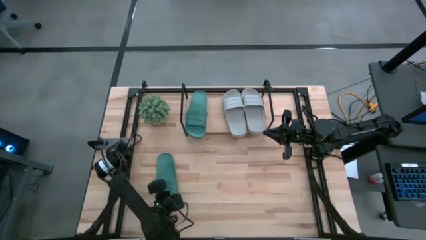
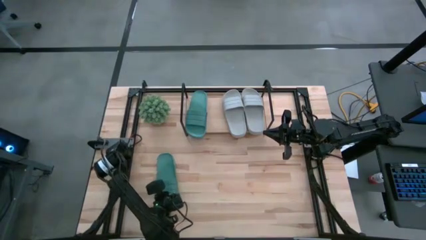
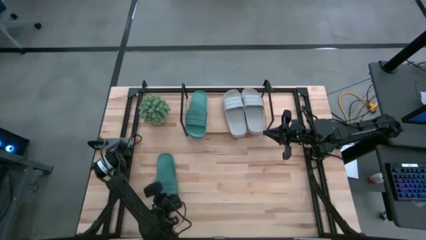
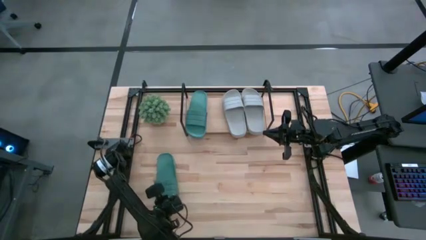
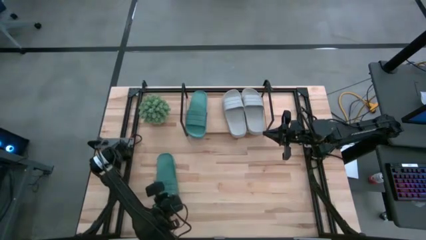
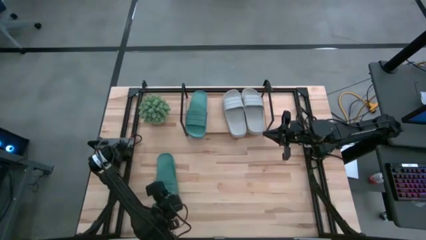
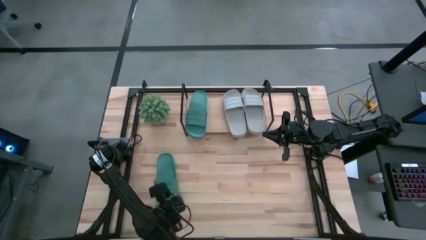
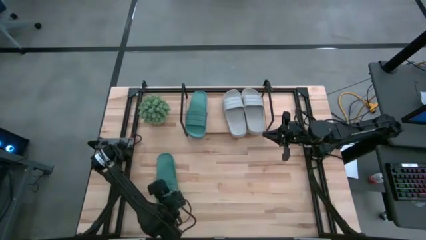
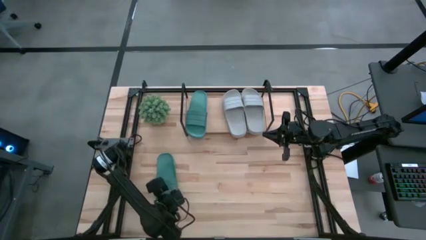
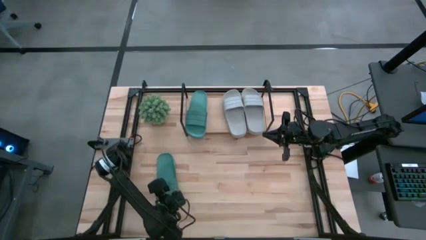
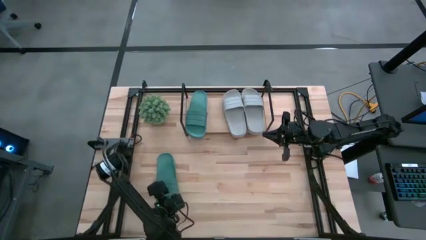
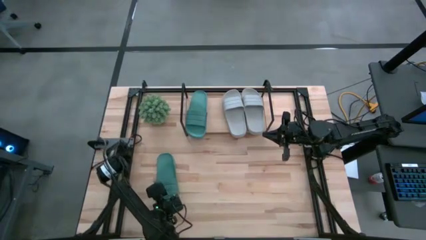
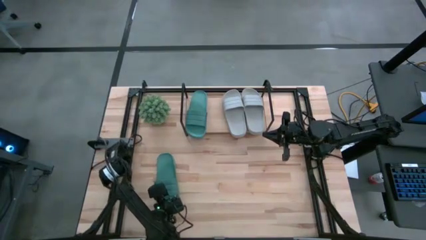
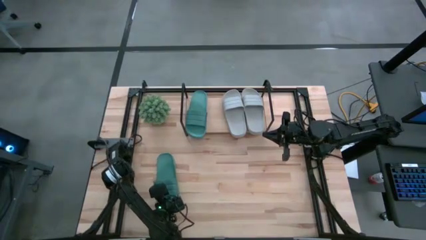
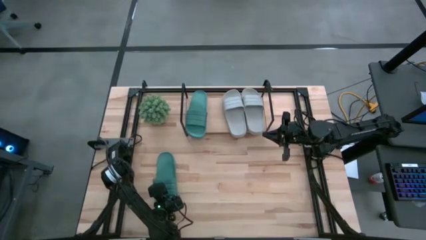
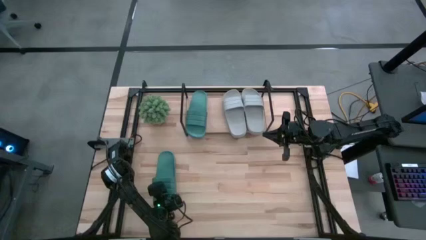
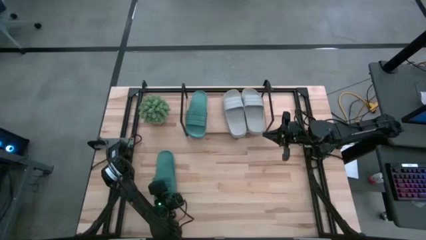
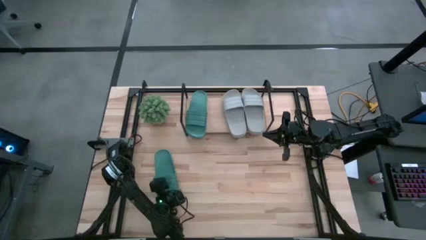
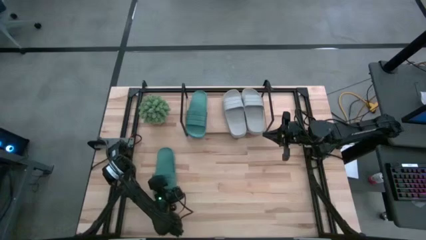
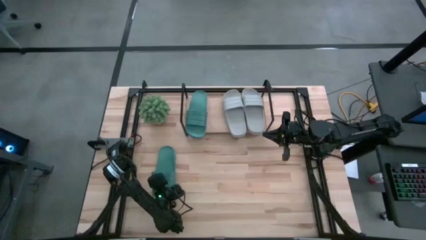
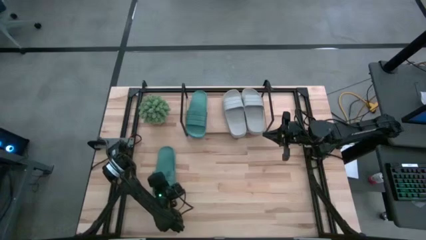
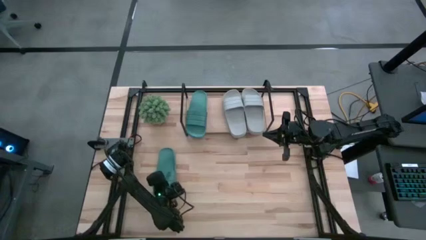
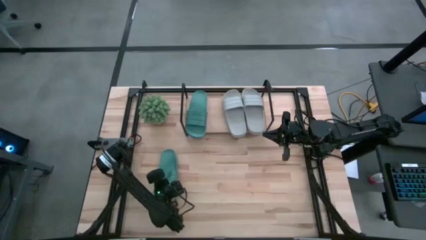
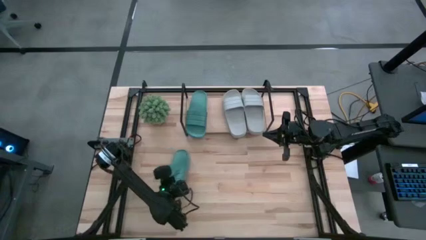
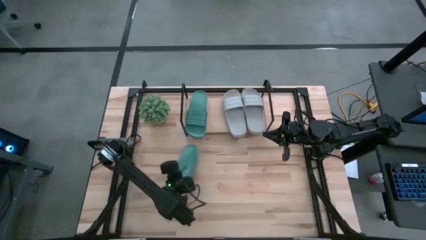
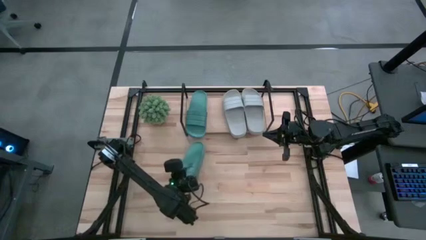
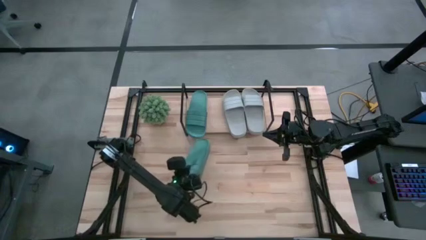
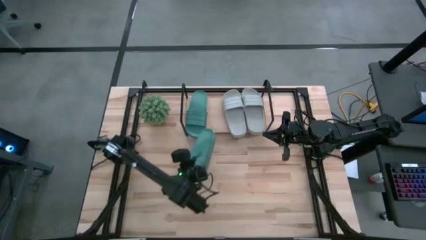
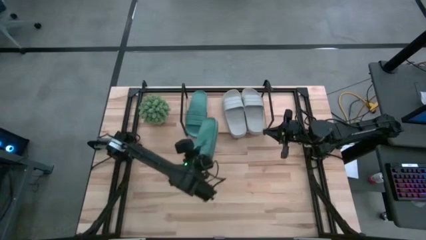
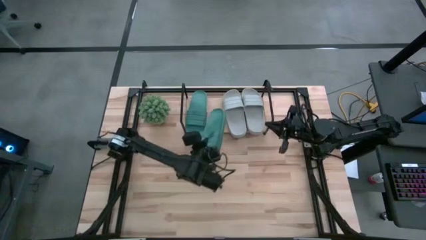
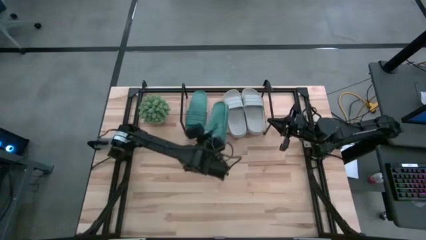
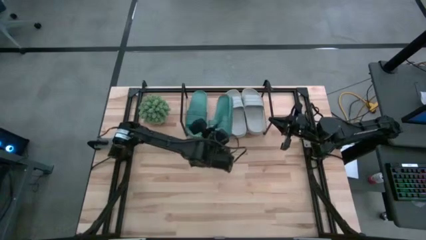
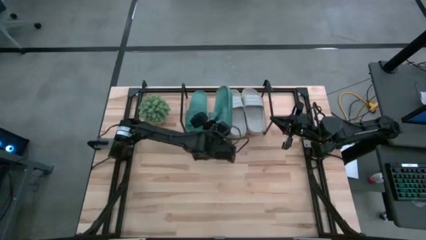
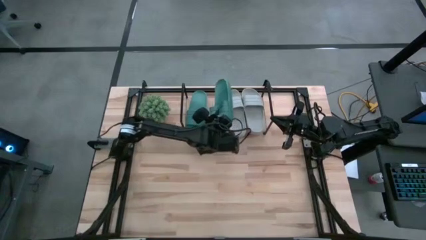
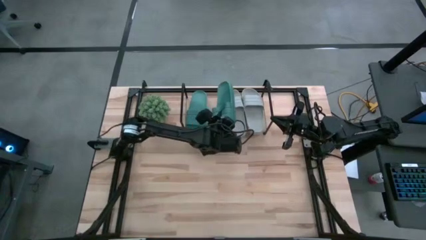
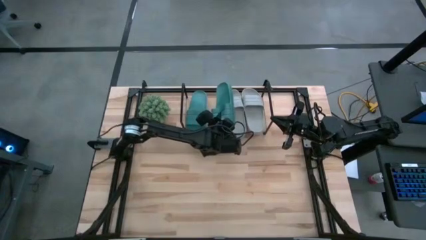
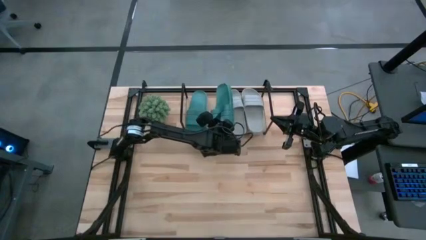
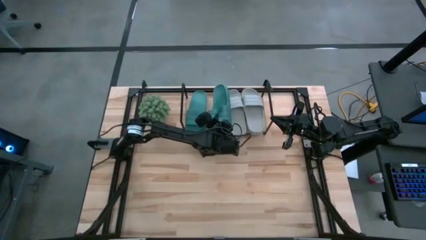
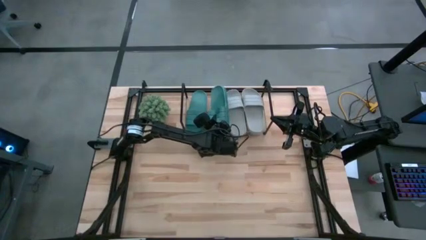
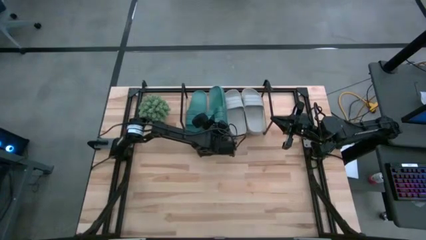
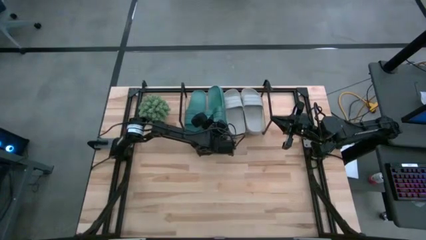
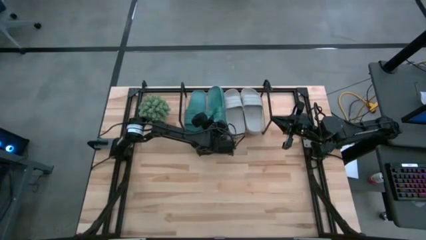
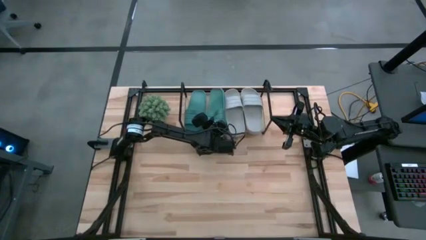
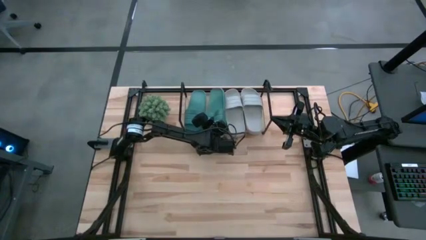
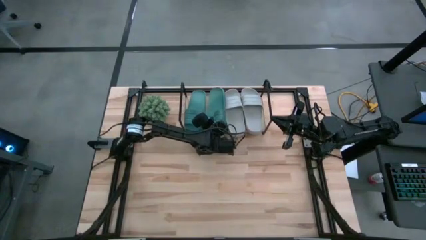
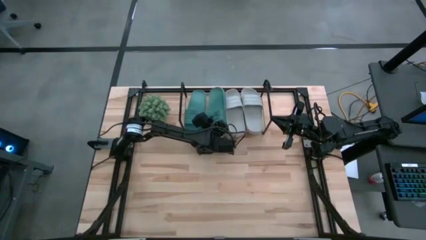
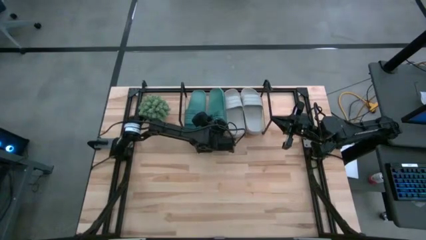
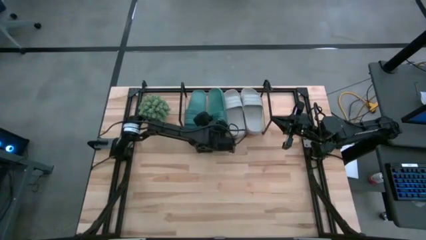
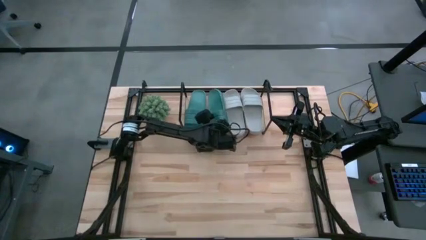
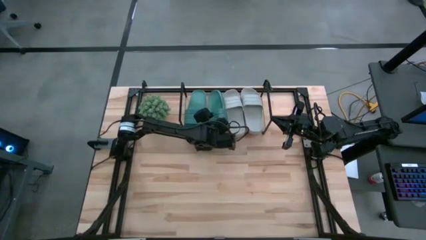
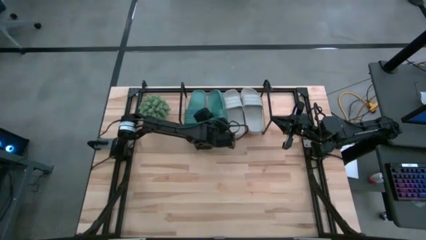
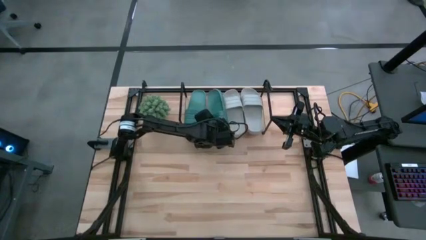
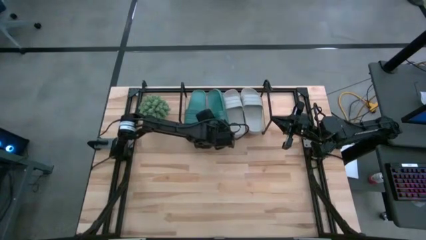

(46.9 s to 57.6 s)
Task: Pick and place slides into the shelf
Put the green slide on the shelf

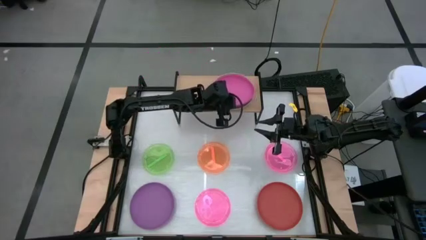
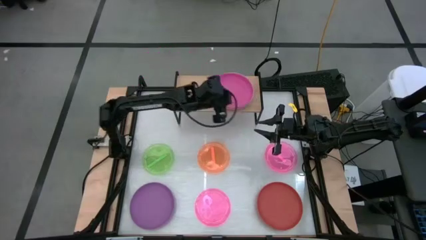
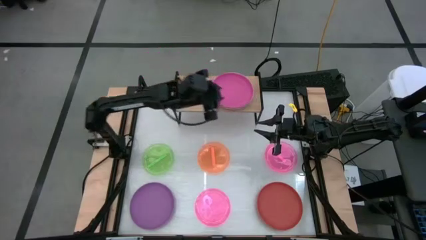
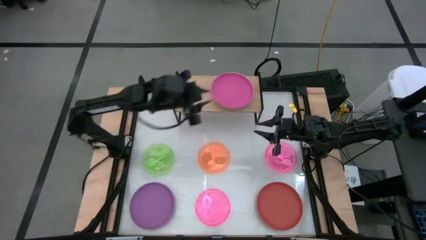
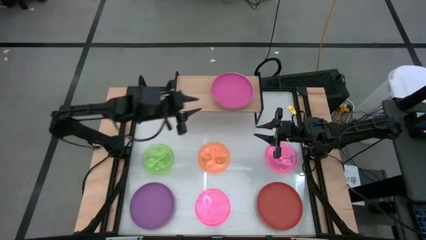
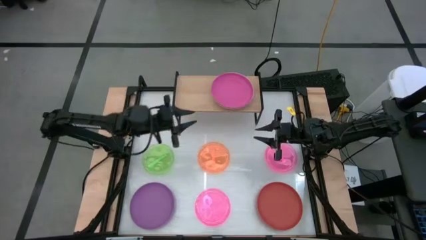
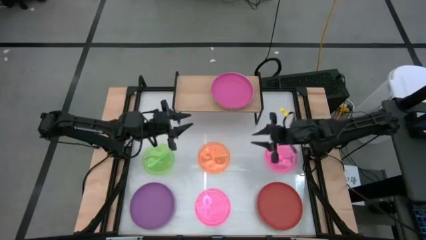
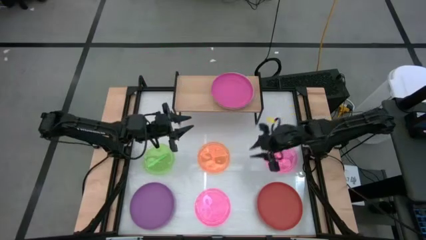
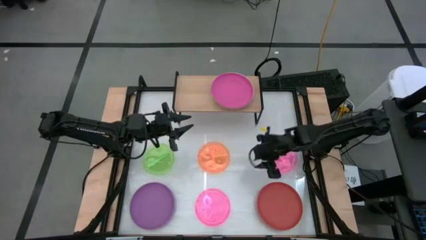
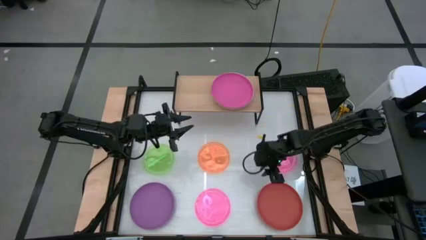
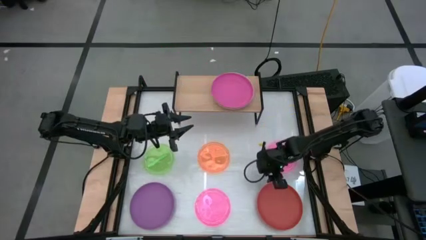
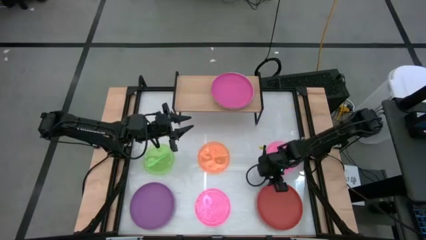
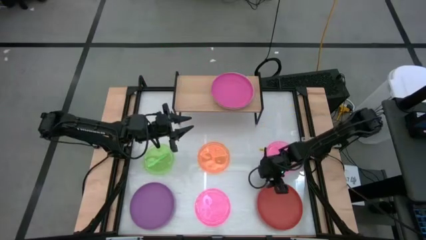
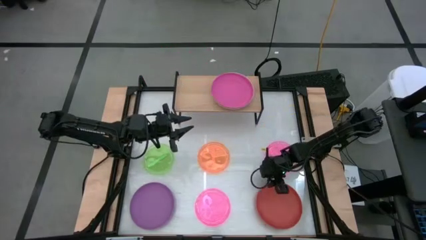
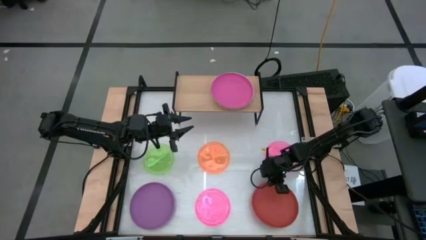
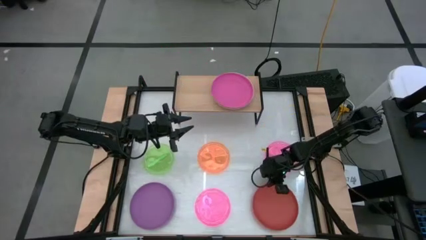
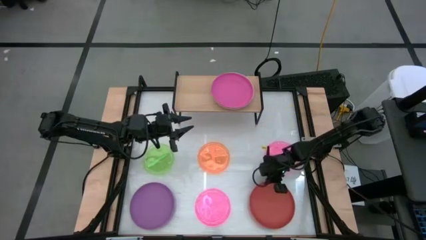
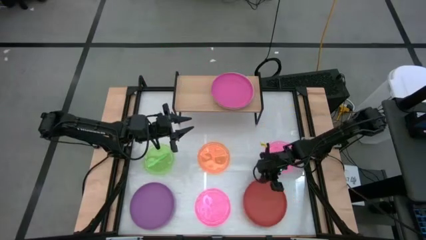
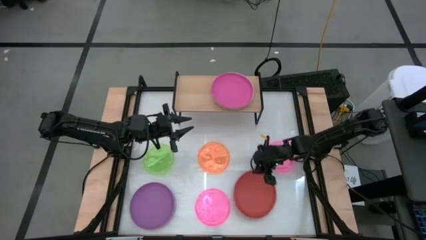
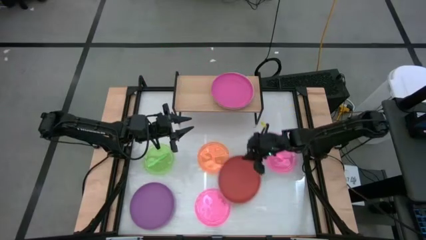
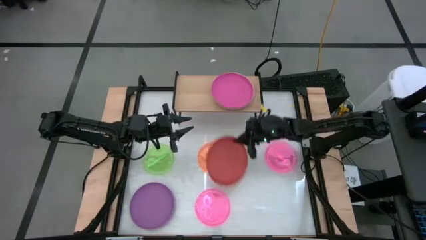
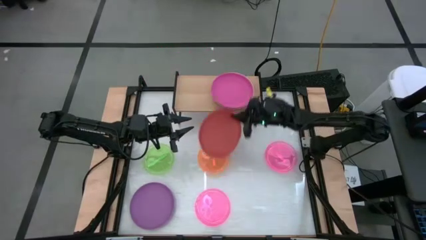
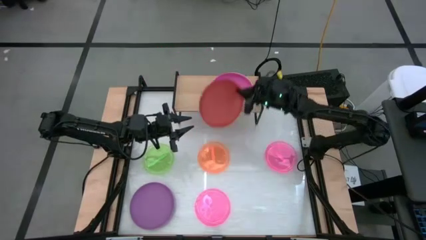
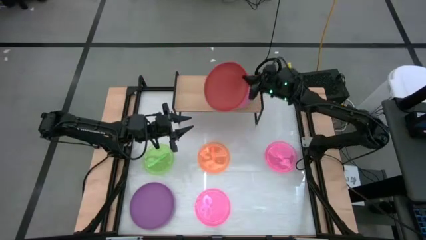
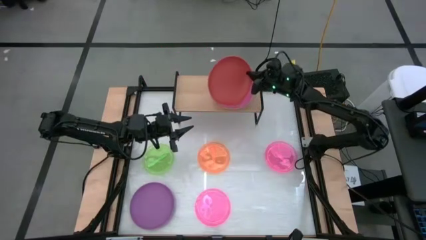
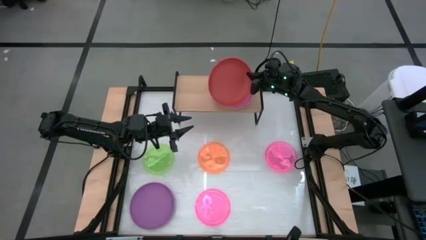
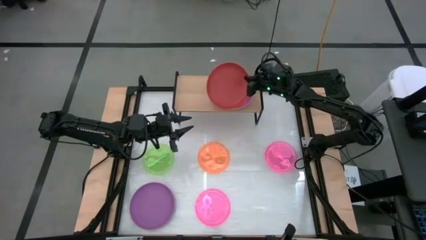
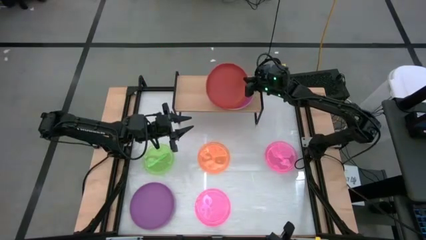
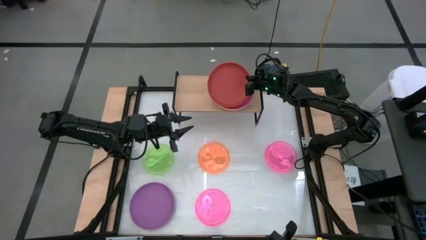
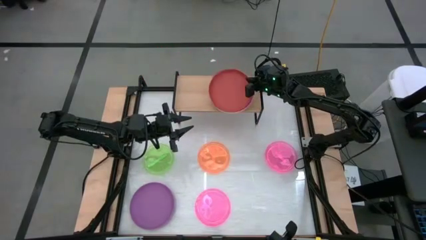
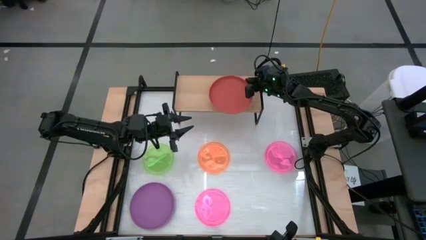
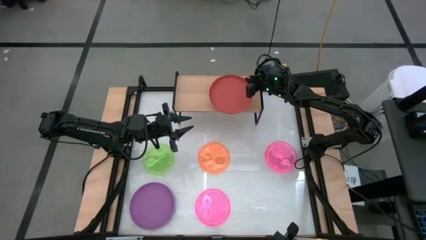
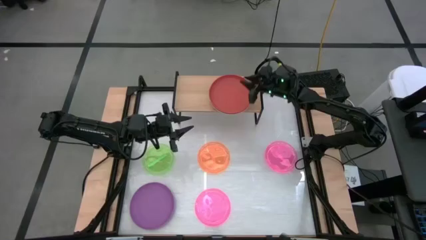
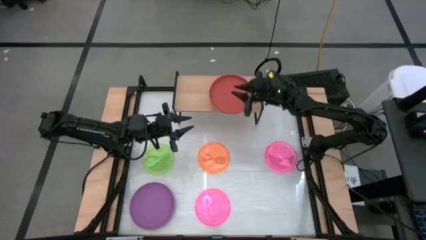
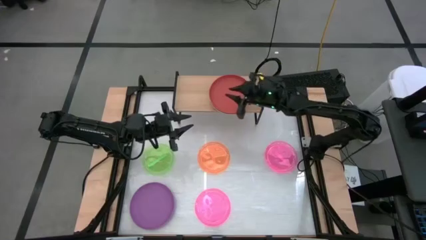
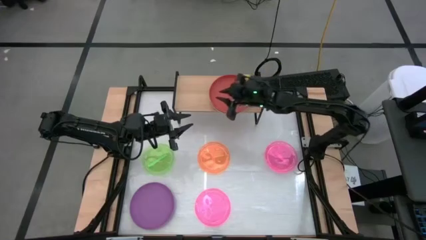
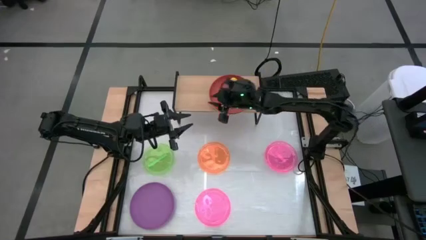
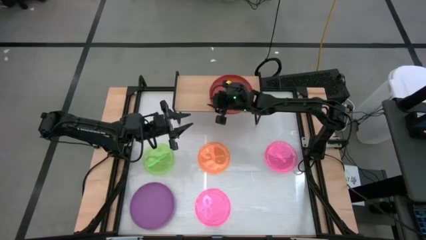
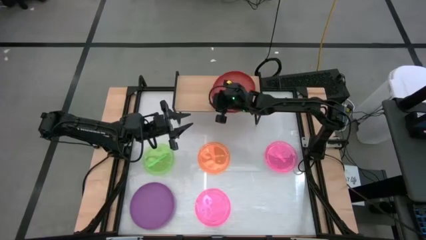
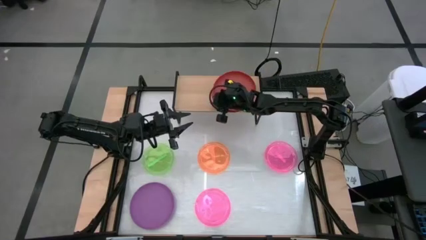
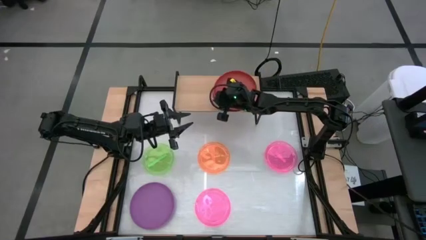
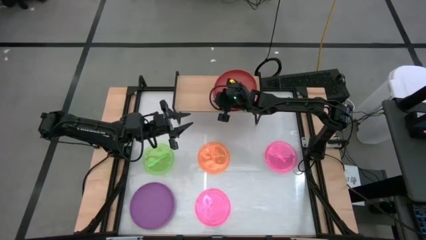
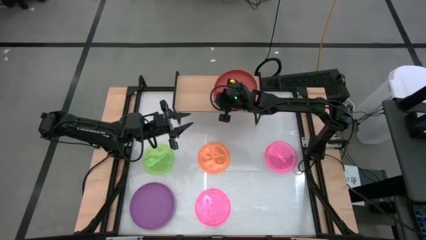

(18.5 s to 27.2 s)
Task: Place and stack plates onto a shelf
Stack the orange plate on top of the pink plate on the shelf
